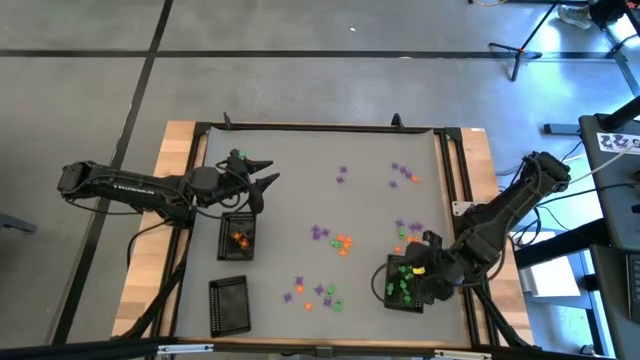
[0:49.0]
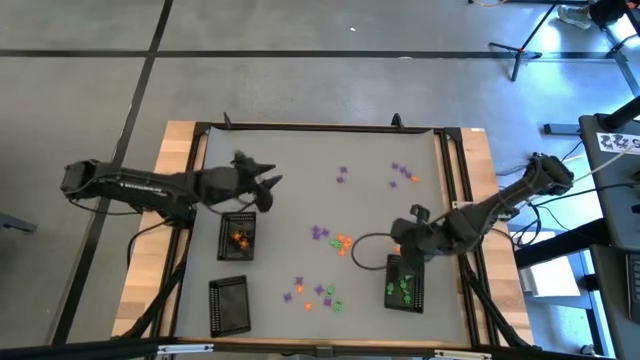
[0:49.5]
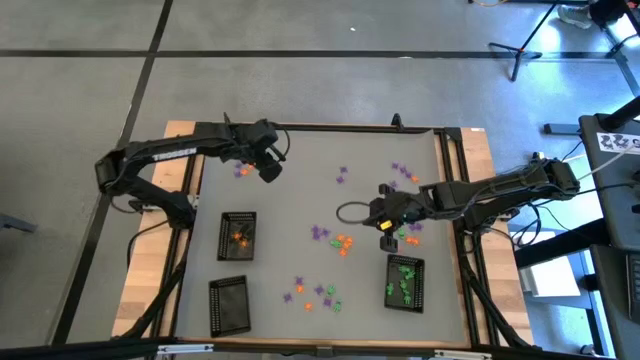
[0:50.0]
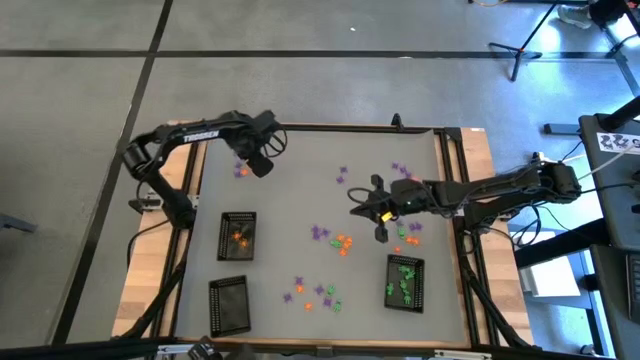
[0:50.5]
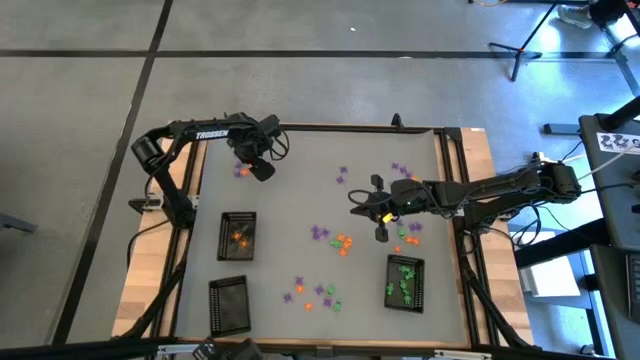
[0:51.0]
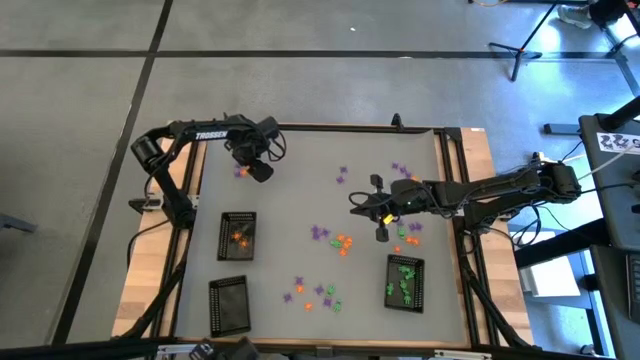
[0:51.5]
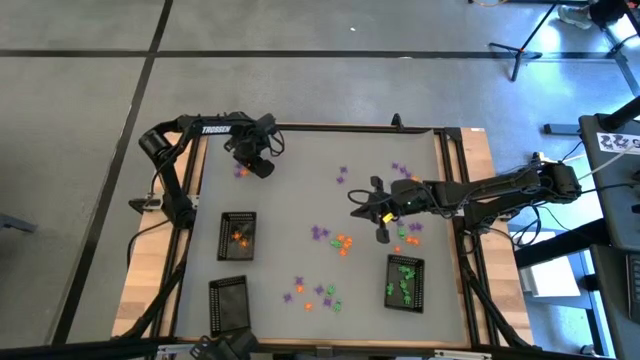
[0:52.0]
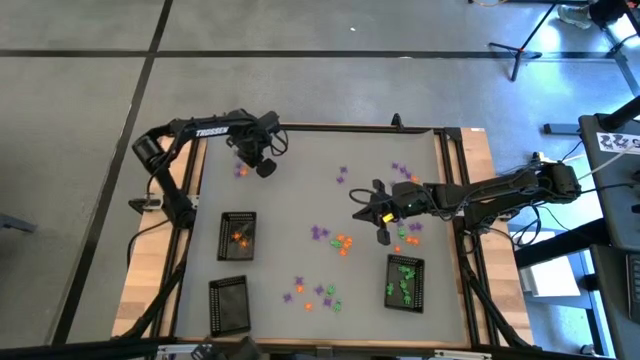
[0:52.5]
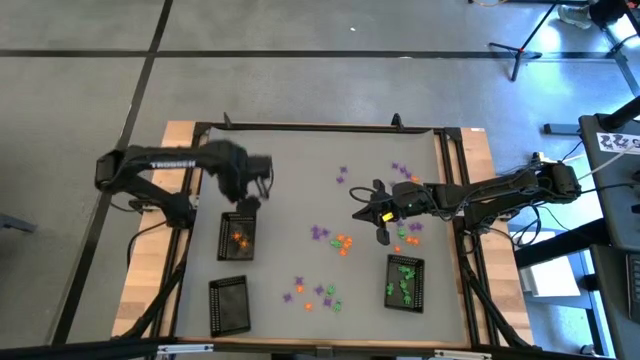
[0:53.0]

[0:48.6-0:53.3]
Task: Sort Halloween decoration
Put the orange spider toy into the top black basket

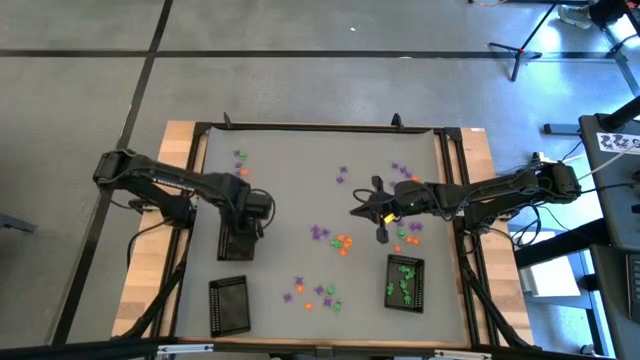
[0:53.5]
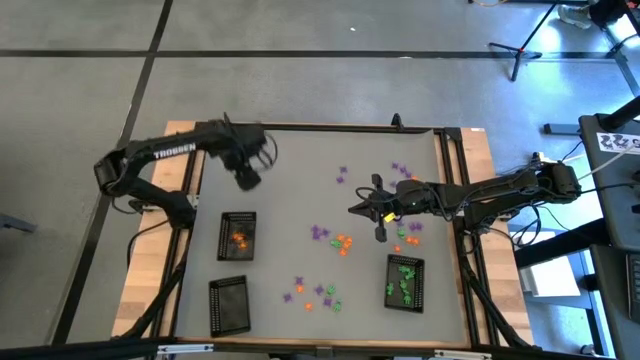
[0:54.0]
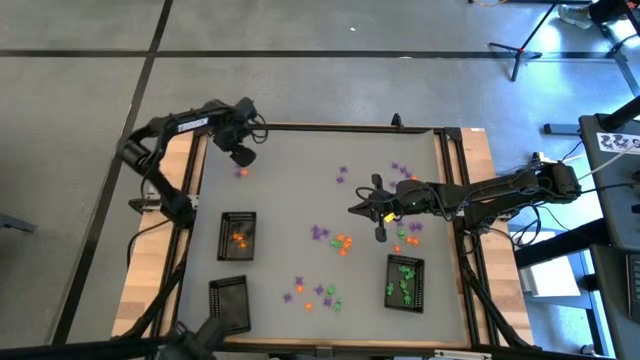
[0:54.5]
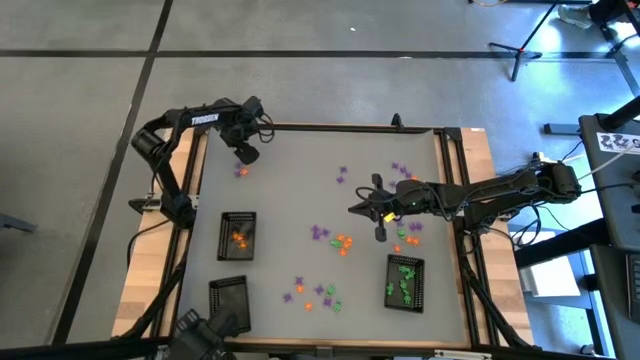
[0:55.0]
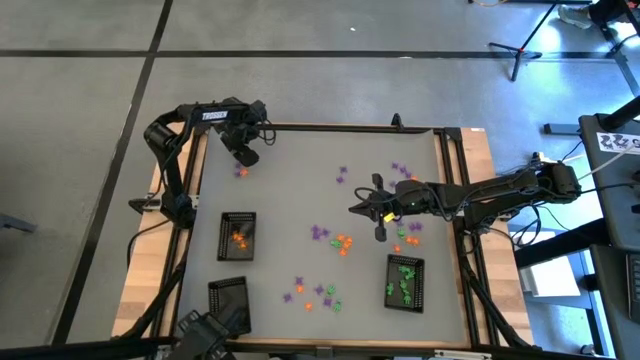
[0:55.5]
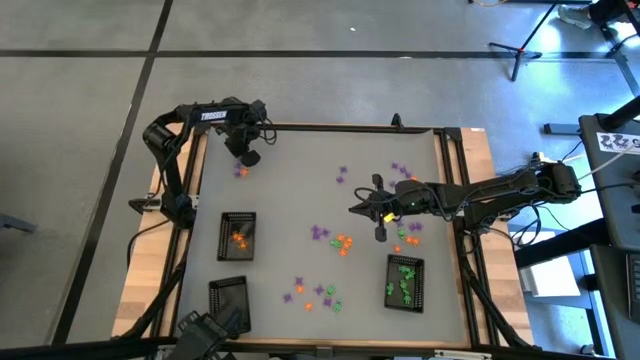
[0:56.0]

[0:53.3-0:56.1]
Put the purple spider toy into the bottom left black basket

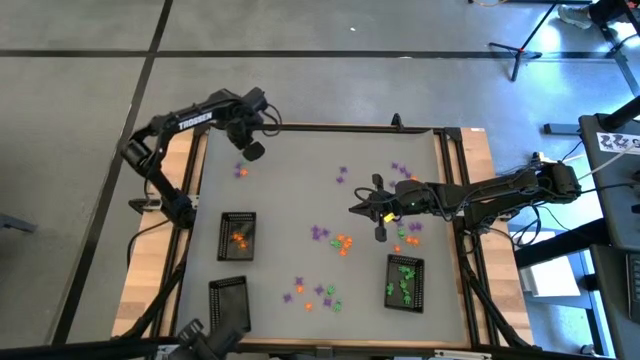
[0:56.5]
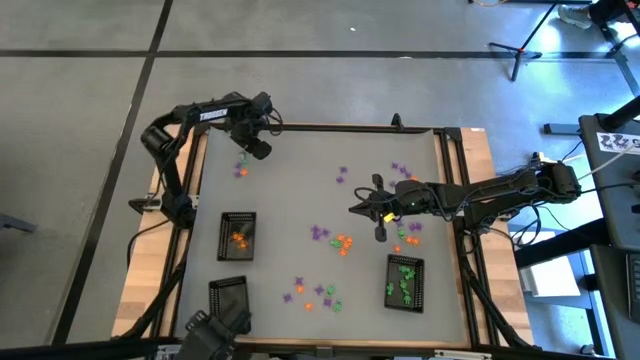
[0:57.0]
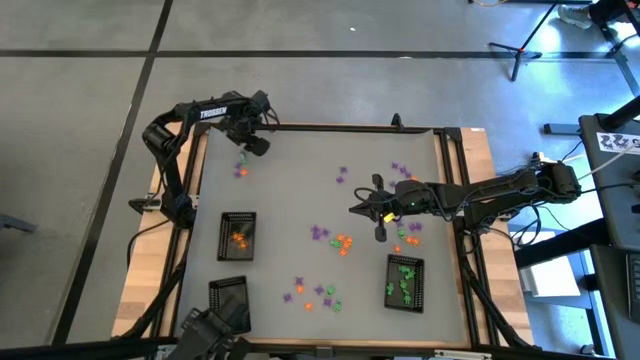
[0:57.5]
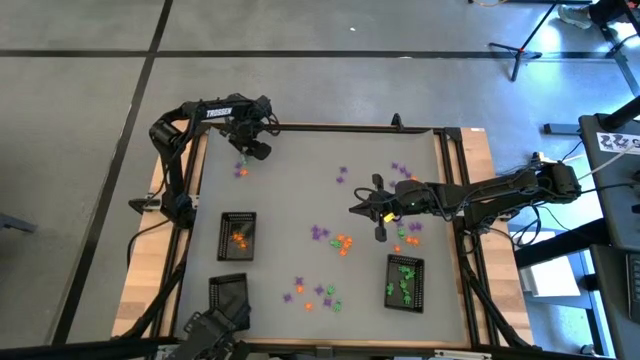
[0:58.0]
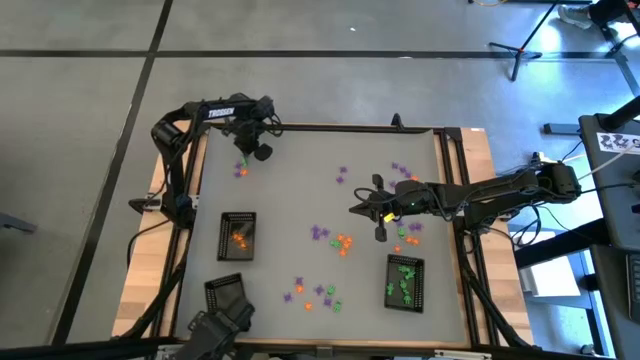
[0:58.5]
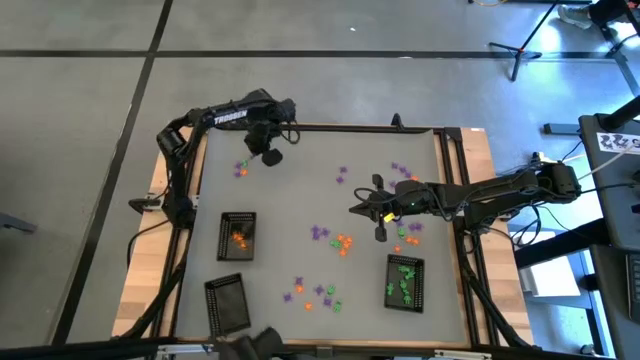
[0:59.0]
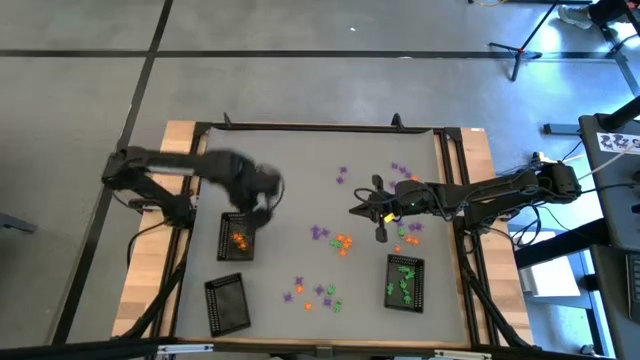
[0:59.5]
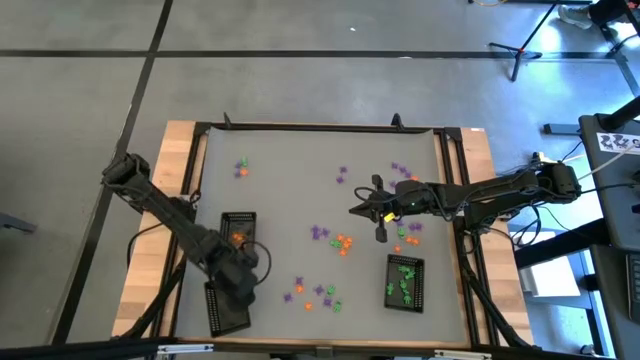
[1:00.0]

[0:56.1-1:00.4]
Put the purple spider toy into the bottom left black basket

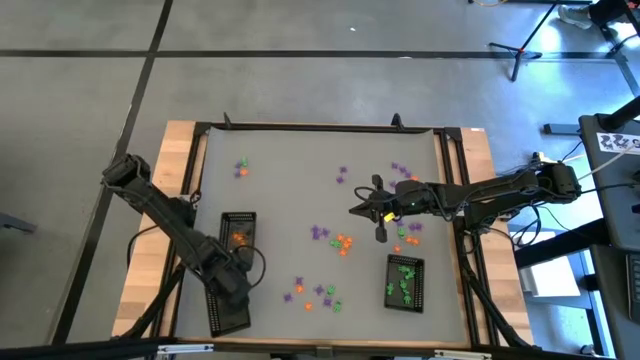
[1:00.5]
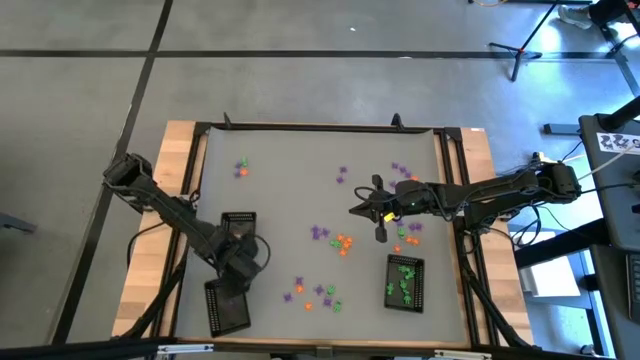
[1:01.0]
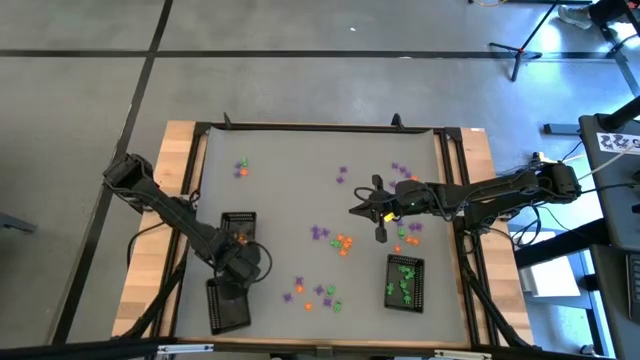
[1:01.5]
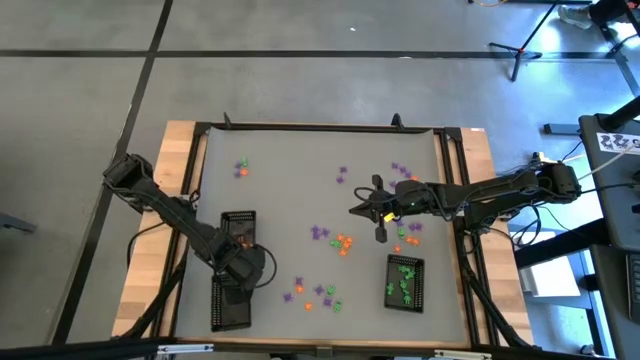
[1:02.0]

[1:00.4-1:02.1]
Adjust the black baskets

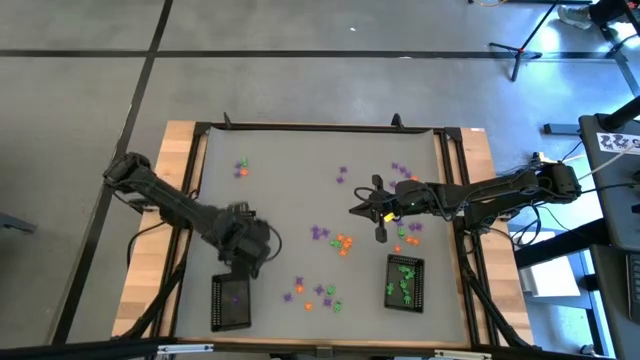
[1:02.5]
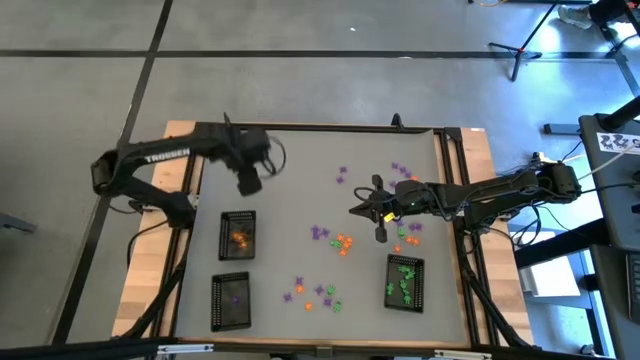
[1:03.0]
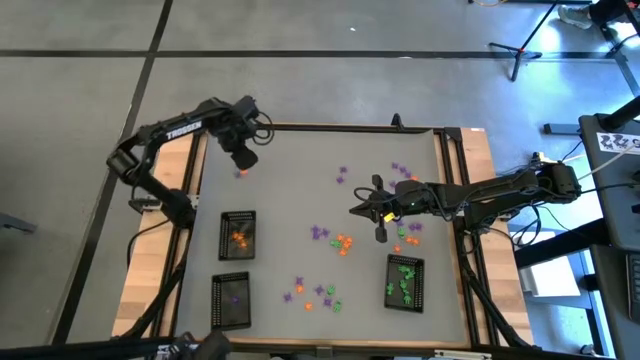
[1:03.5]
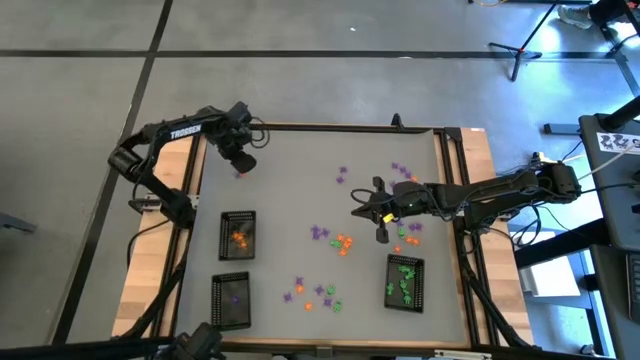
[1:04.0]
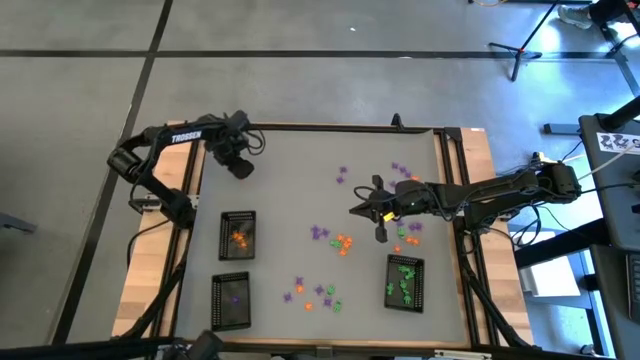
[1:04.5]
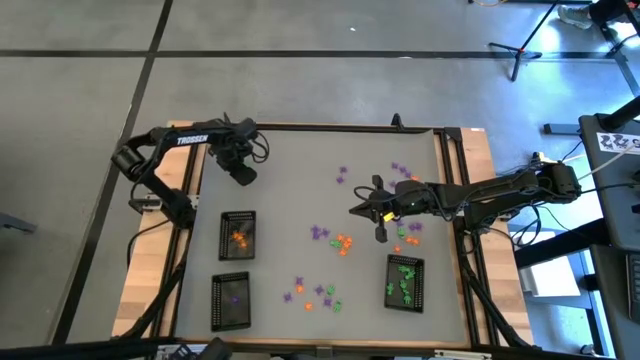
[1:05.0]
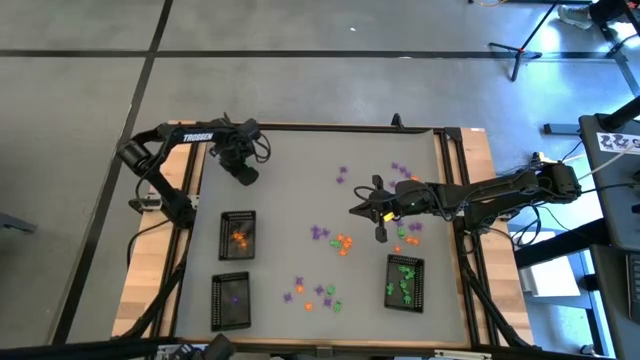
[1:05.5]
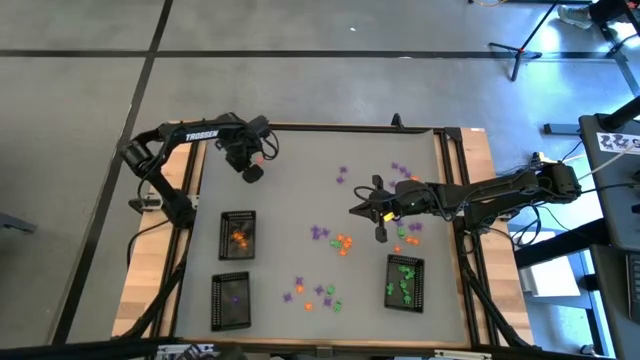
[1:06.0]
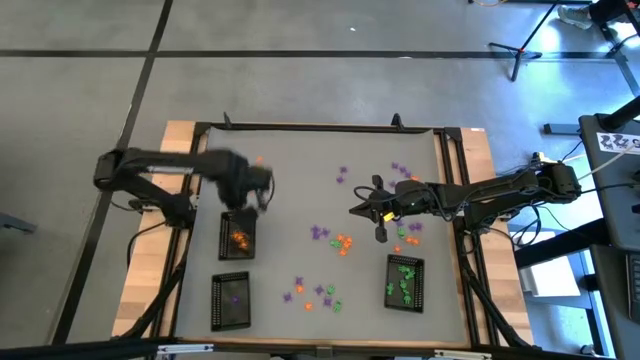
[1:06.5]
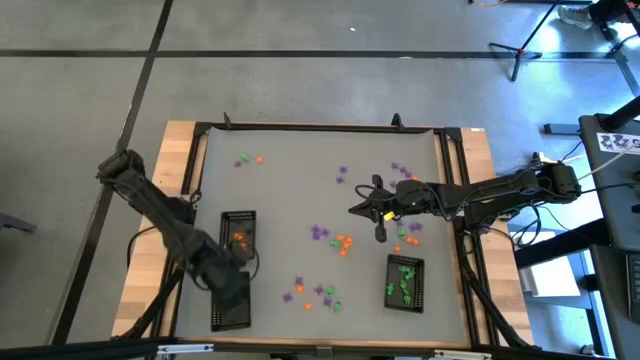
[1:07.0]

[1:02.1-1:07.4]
Put the purple spider toy into the bottom left black basket

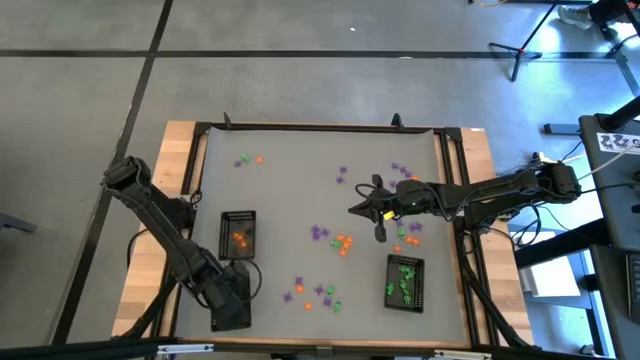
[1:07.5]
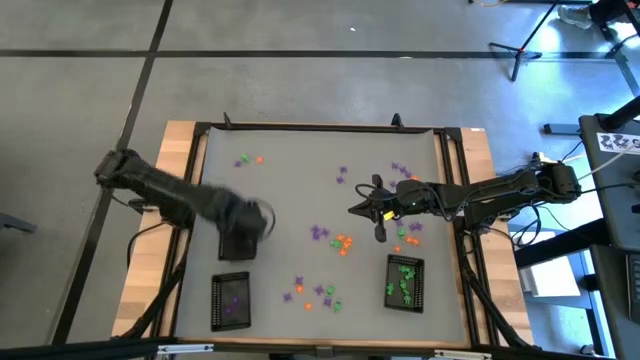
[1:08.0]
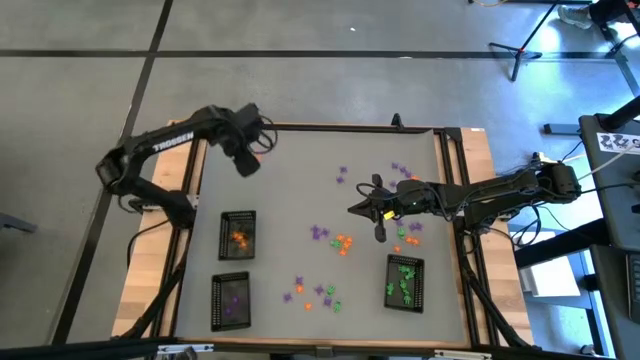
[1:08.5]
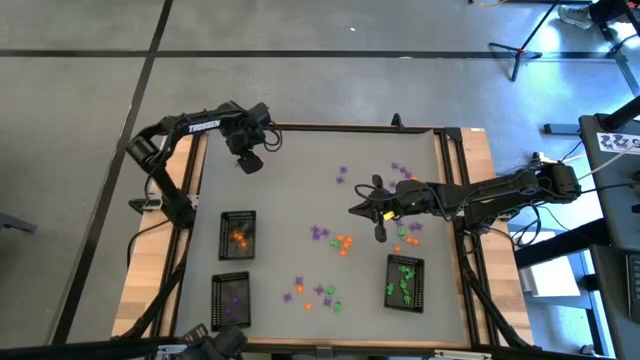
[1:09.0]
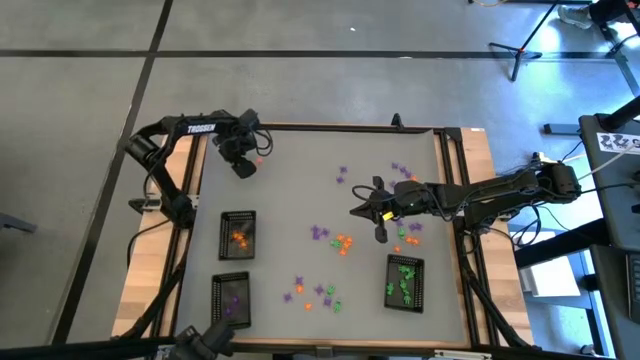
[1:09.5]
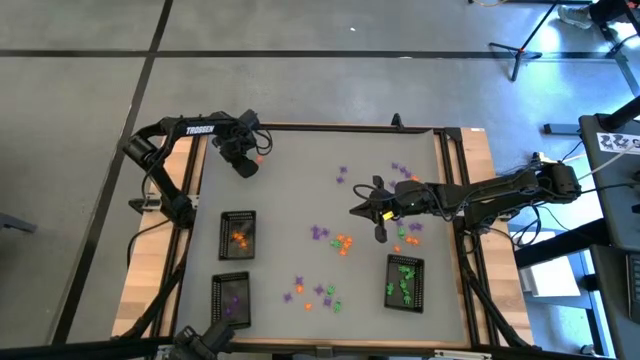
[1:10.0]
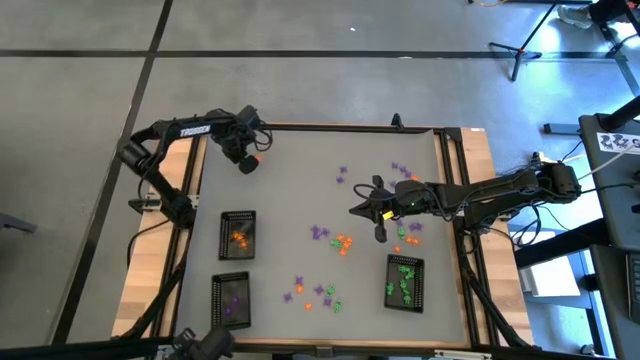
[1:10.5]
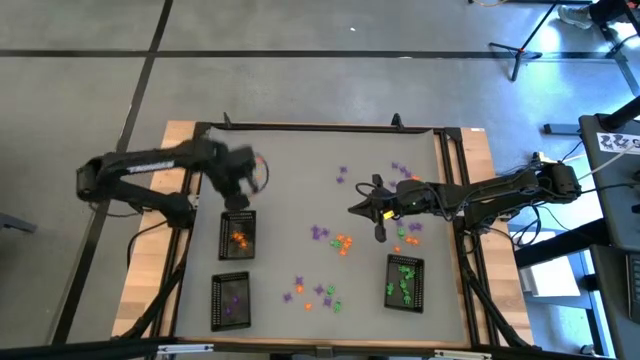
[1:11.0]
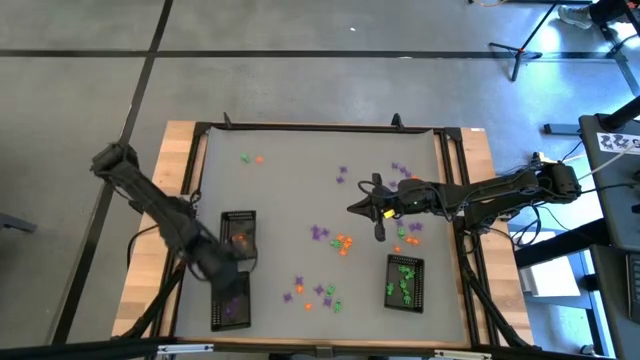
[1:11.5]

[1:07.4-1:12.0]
Put the purple spider toy into the bottom left black basket
